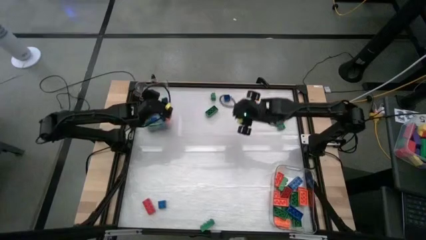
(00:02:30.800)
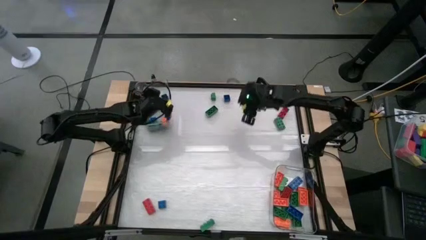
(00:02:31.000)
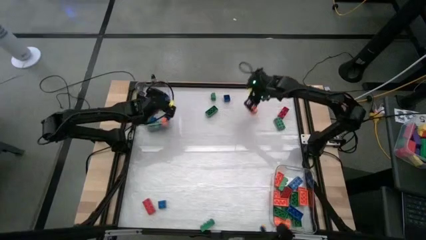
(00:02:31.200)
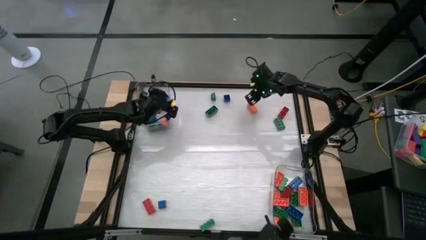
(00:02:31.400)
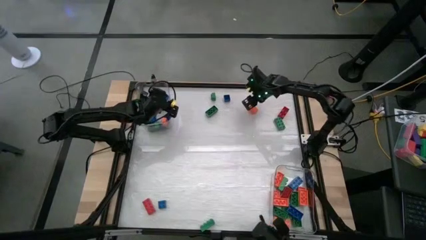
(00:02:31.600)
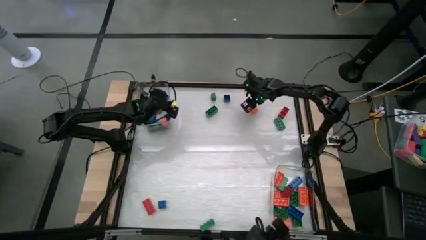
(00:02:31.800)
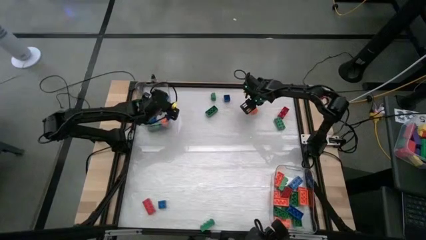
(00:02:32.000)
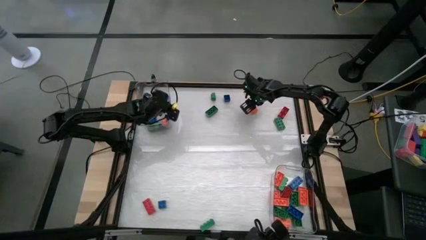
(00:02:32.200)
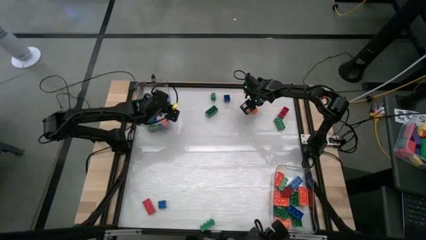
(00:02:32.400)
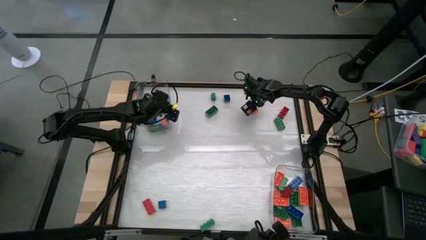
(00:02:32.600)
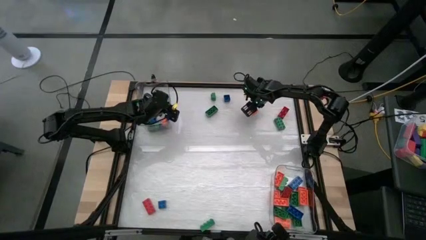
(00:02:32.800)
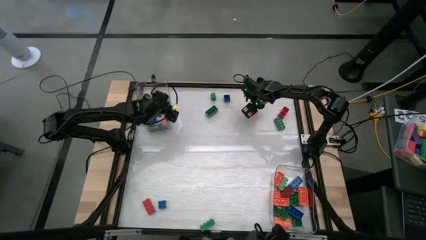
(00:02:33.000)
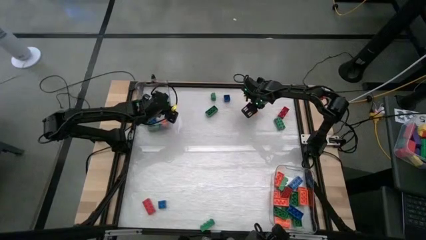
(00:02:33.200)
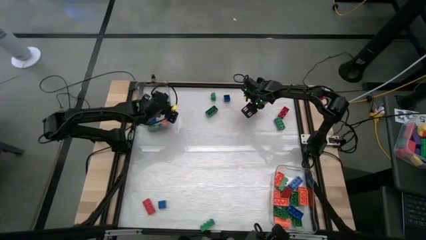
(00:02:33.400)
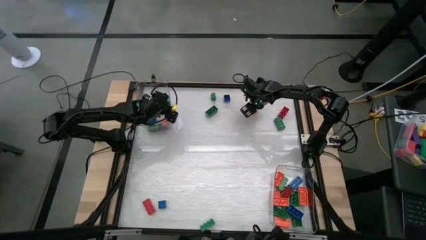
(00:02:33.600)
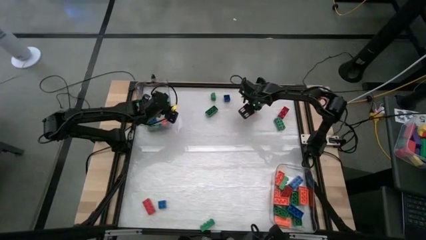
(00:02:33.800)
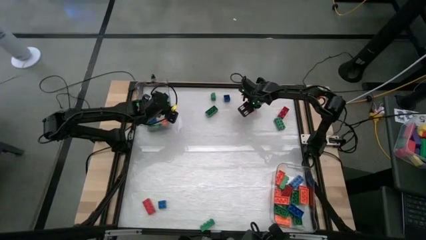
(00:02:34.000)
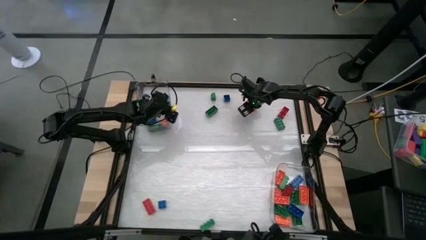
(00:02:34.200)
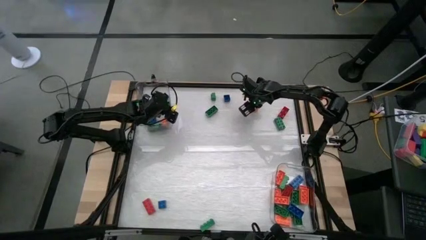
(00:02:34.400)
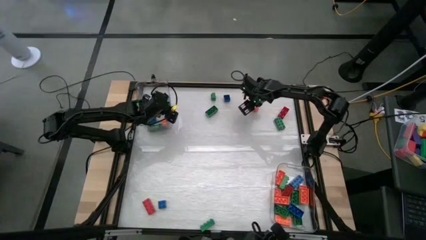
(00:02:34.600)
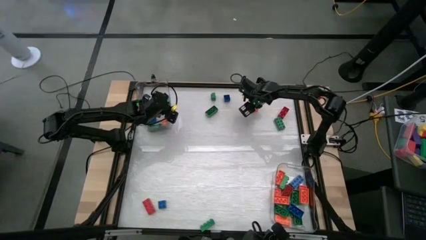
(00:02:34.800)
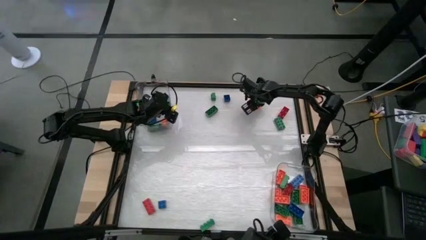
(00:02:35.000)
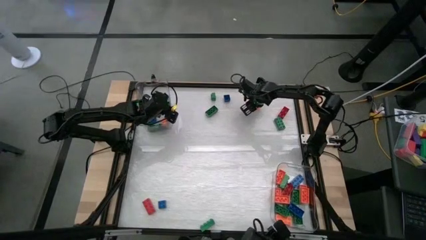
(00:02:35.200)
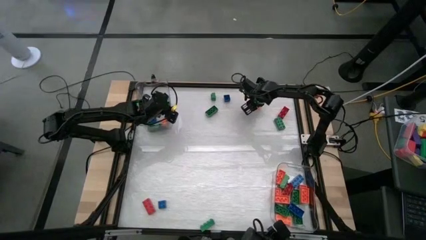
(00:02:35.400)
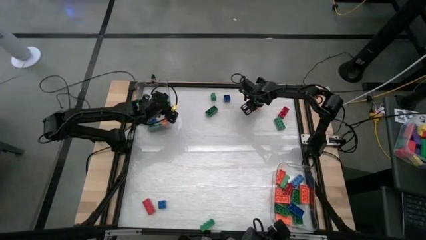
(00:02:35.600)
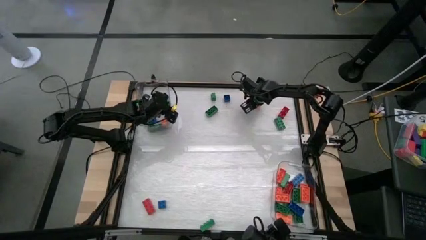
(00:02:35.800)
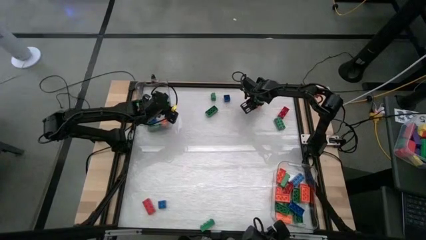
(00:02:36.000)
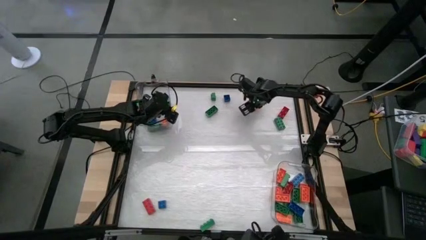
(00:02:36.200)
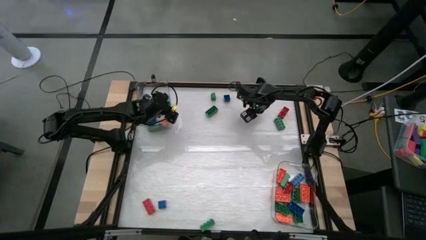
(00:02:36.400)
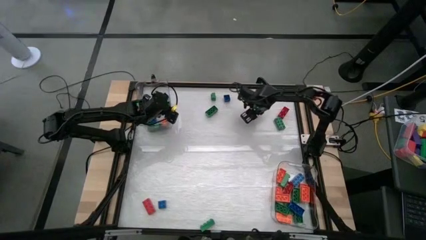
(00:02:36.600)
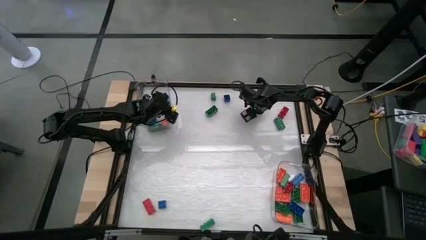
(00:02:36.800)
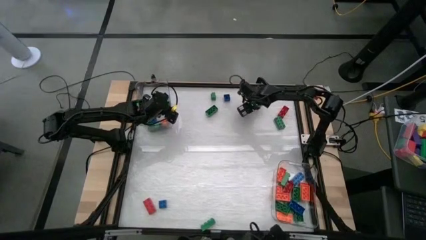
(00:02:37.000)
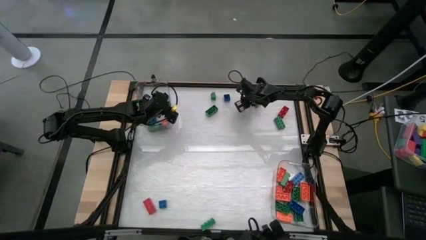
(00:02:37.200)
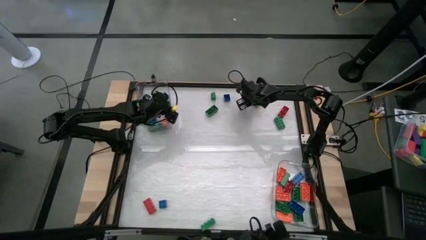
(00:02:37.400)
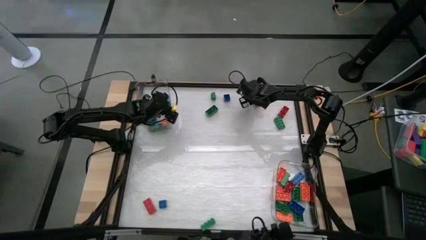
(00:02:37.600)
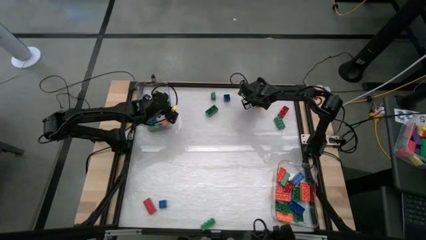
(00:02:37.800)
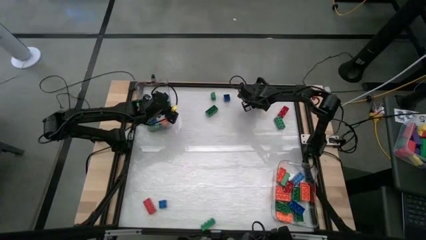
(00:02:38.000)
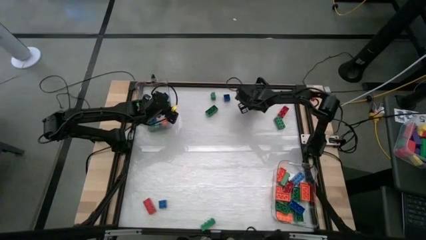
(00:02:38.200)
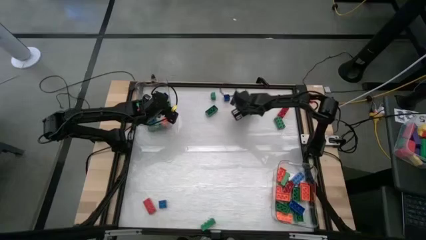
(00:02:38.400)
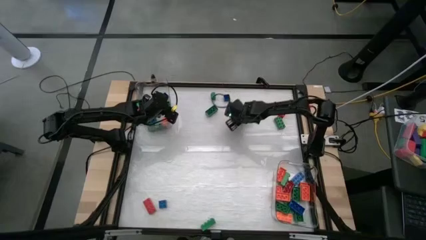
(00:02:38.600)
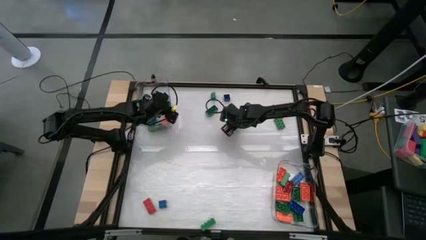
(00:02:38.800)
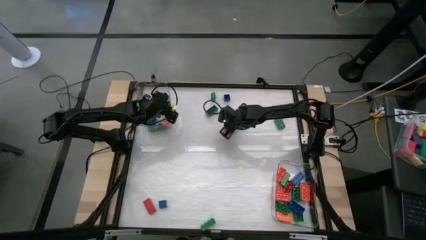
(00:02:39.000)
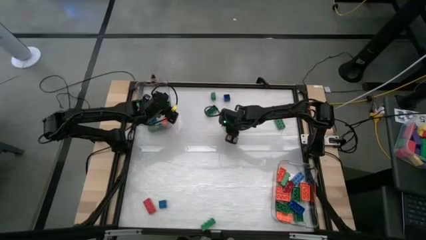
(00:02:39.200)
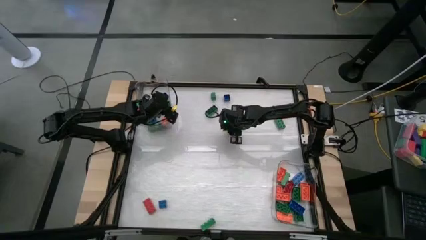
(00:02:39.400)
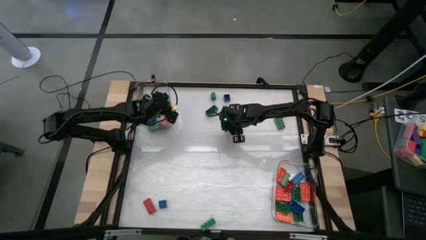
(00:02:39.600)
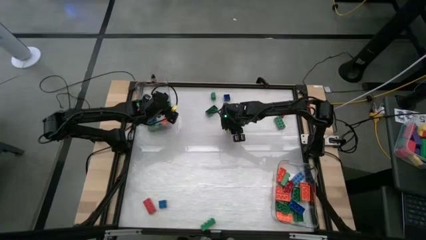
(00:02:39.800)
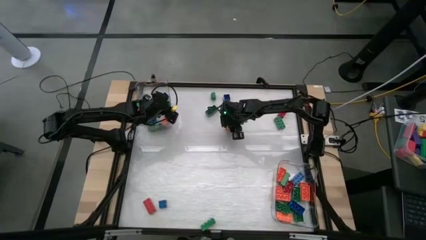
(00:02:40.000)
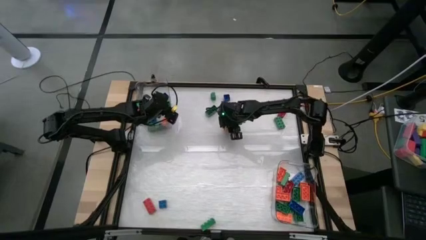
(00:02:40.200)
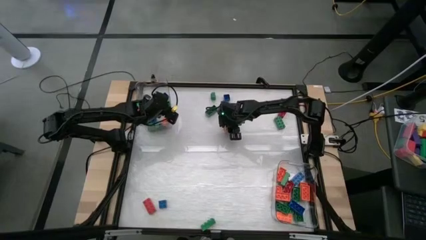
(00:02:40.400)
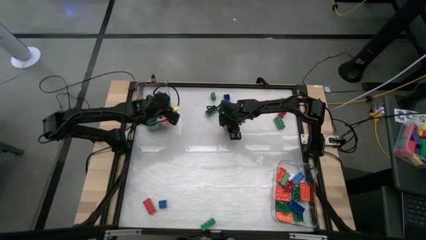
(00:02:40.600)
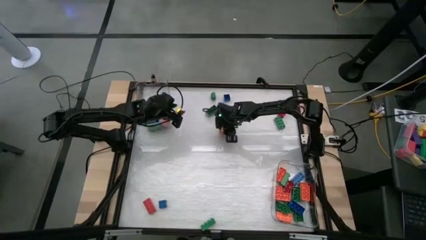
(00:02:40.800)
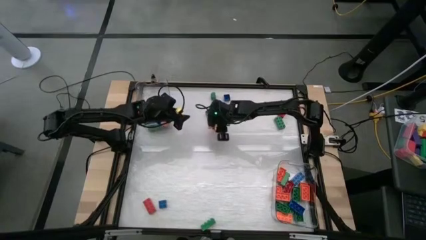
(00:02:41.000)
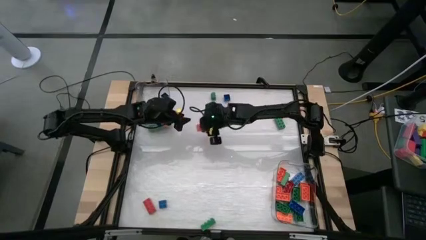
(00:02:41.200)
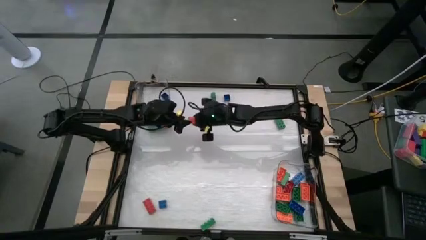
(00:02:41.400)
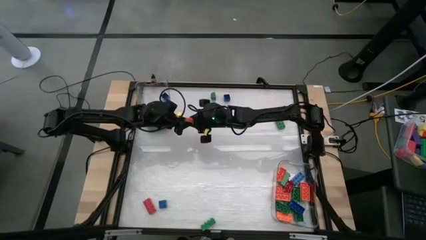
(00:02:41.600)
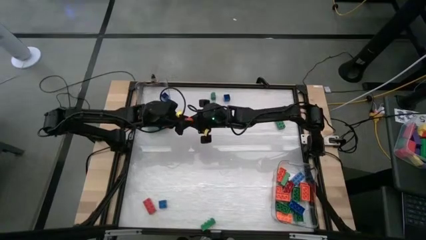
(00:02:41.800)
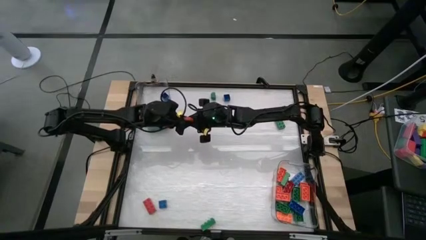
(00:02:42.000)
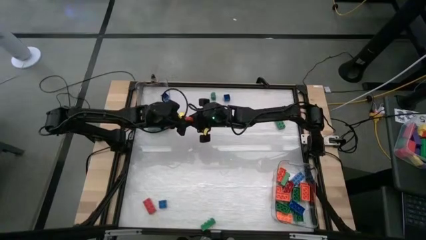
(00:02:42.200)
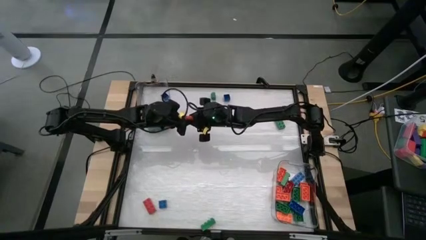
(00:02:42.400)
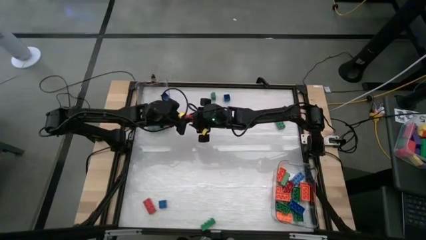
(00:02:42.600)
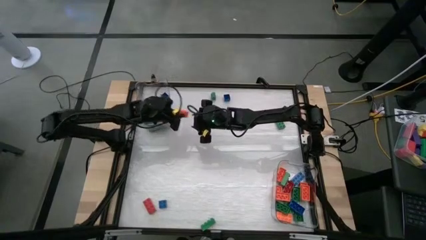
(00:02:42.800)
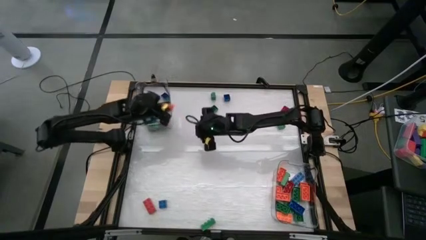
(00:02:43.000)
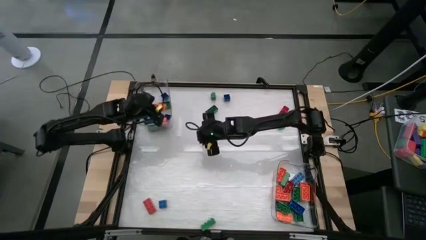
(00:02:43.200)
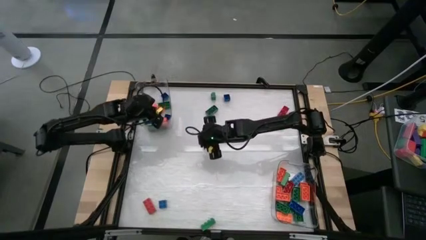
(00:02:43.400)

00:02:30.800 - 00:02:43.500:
Task: Sort blocks by size
Put the 8 stud orange game piece into the bottom transparent bin

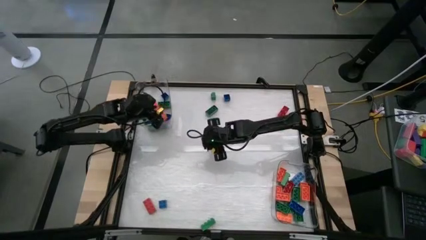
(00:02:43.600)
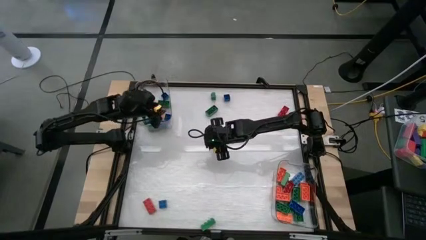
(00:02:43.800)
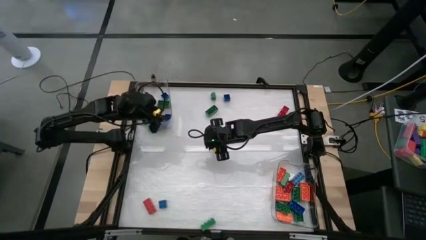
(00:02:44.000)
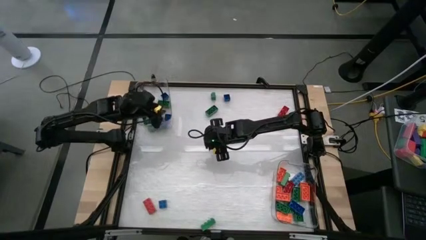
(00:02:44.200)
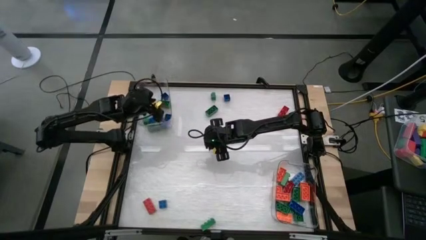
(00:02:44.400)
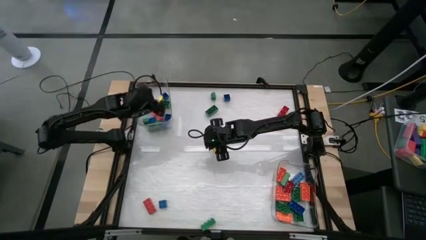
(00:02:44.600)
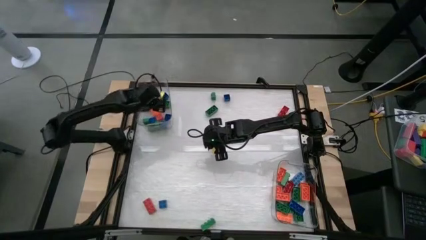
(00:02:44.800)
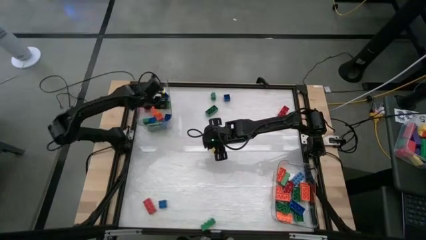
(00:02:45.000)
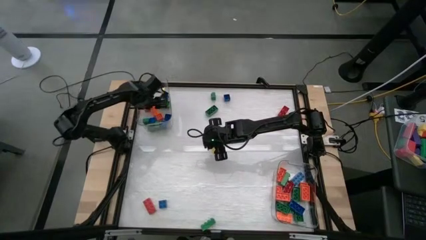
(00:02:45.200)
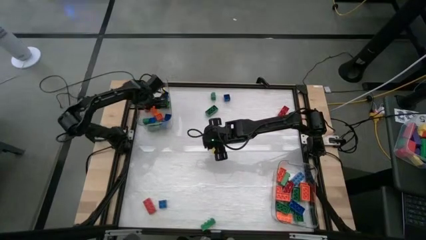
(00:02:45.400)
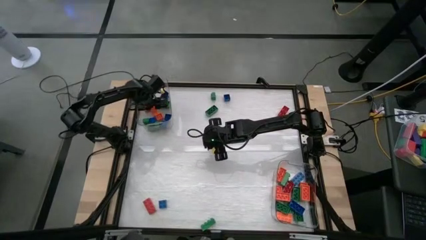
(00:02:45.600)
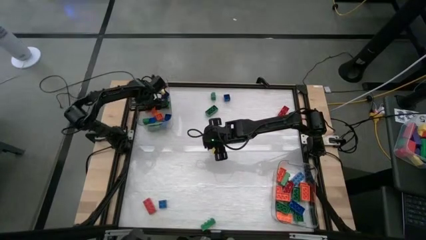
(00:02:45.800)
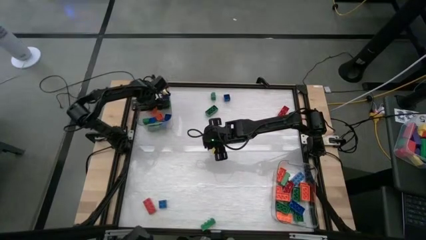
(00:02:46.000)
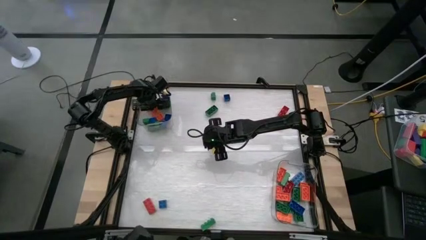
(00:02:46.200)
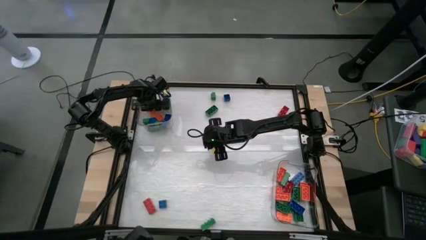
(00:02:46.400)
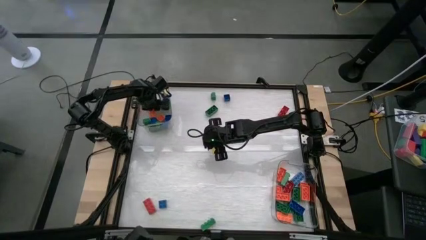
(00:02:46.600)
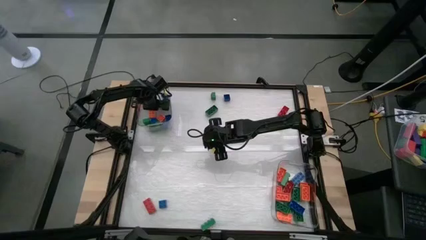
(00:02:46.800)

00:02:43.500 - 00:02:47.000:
Put the 8 stud orange game piece into the bottom transparent bin
